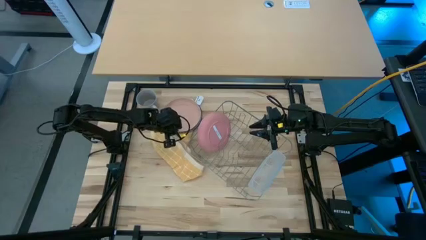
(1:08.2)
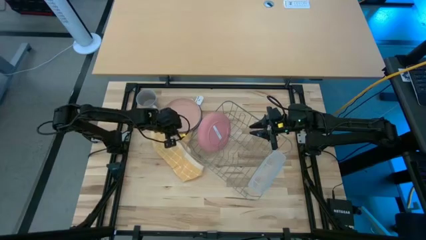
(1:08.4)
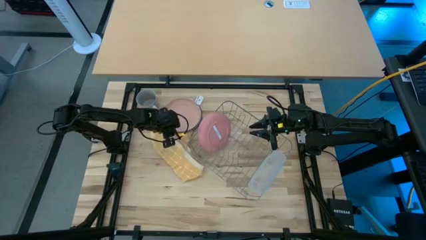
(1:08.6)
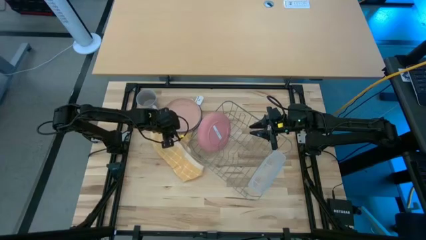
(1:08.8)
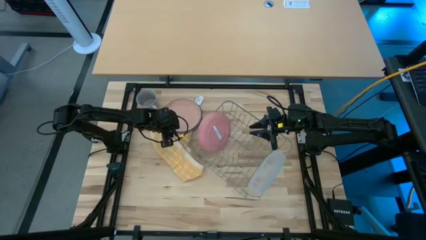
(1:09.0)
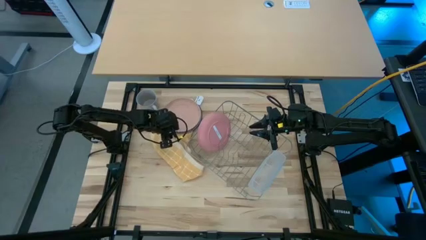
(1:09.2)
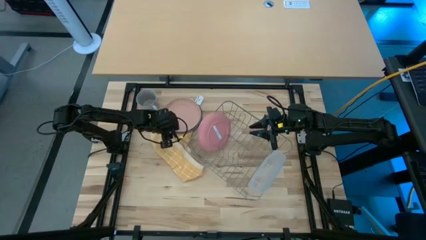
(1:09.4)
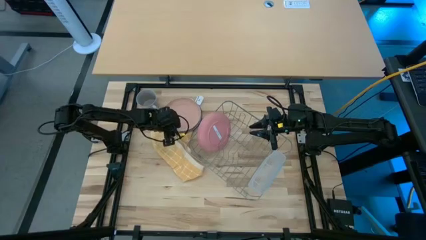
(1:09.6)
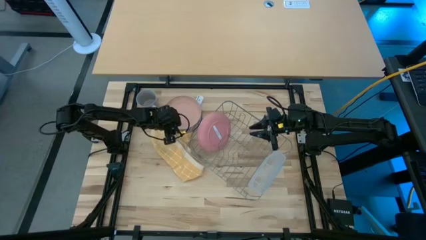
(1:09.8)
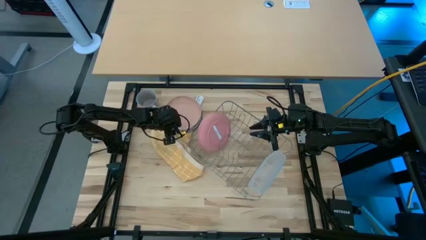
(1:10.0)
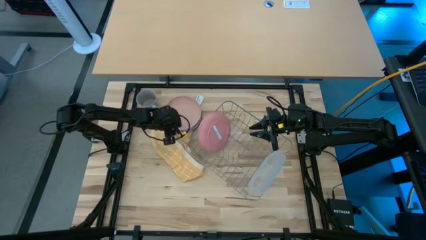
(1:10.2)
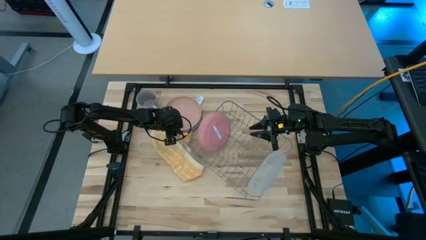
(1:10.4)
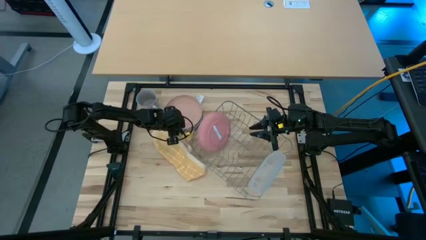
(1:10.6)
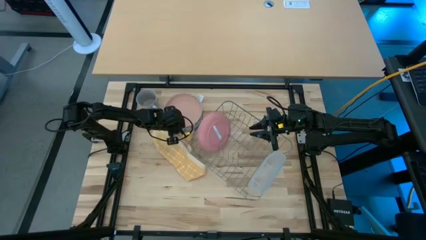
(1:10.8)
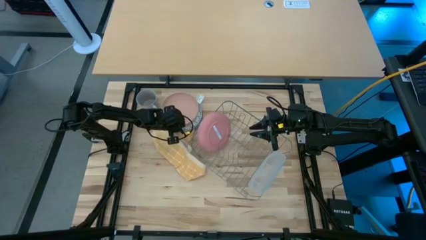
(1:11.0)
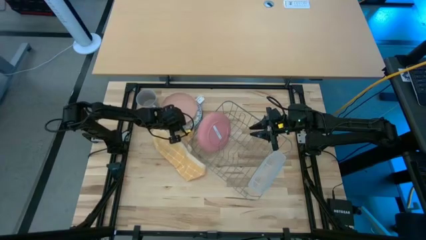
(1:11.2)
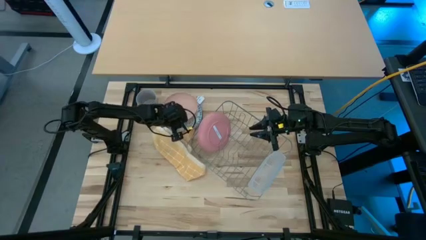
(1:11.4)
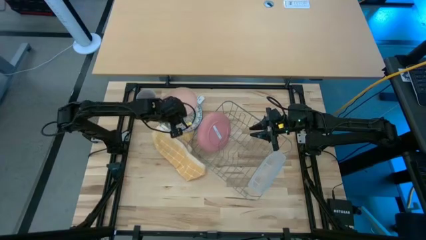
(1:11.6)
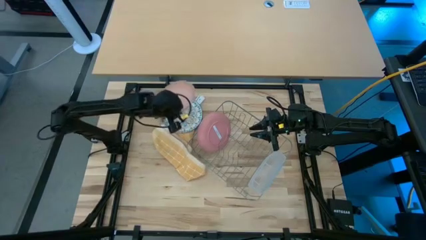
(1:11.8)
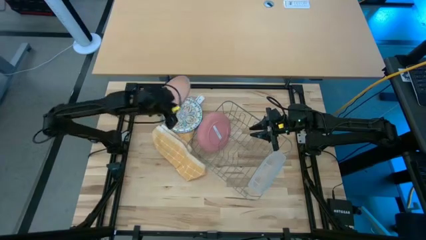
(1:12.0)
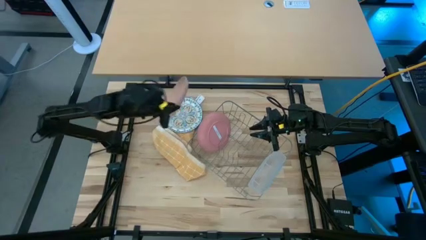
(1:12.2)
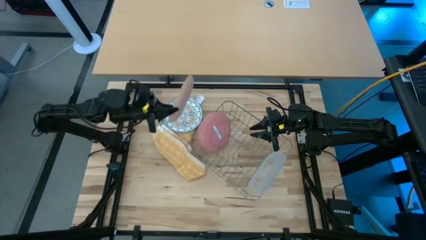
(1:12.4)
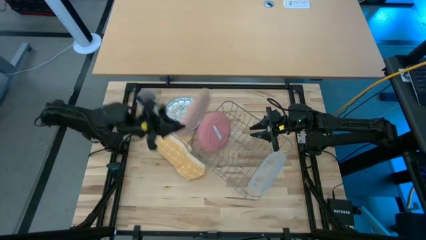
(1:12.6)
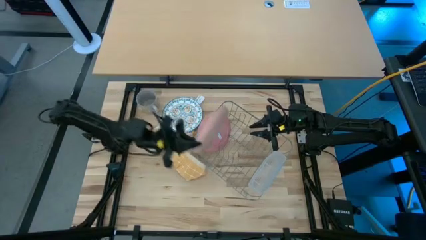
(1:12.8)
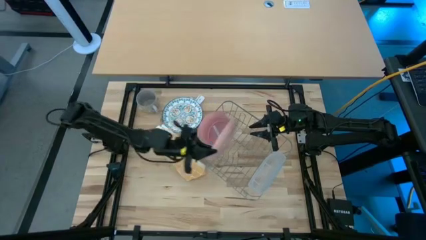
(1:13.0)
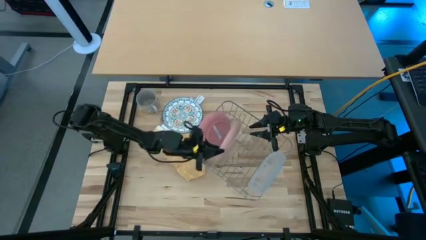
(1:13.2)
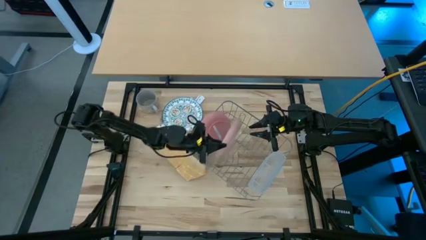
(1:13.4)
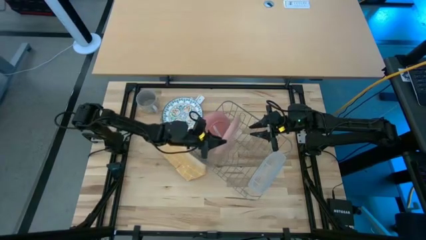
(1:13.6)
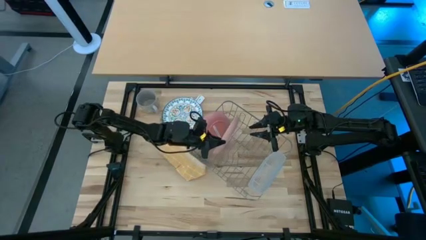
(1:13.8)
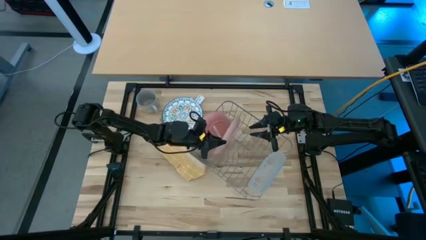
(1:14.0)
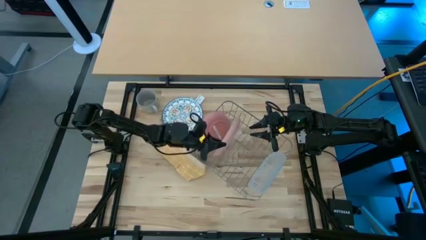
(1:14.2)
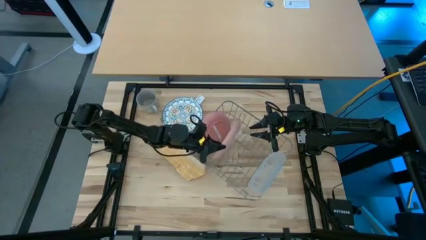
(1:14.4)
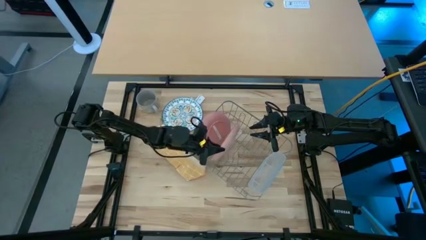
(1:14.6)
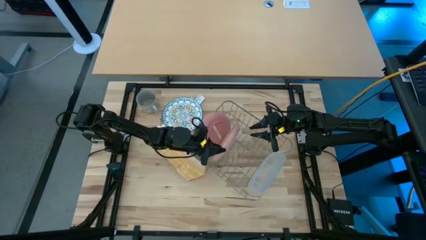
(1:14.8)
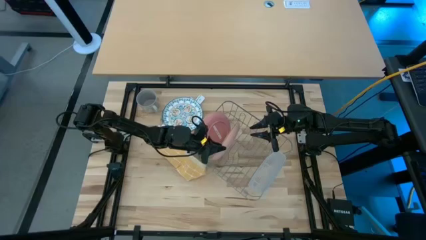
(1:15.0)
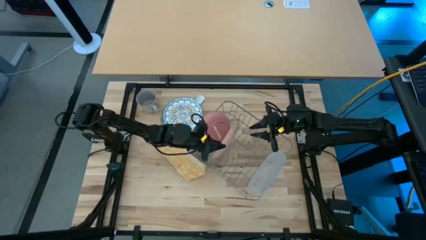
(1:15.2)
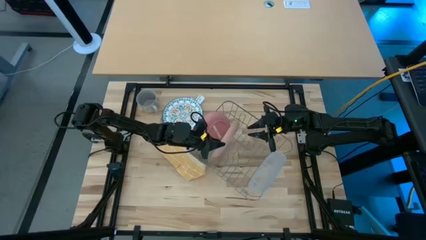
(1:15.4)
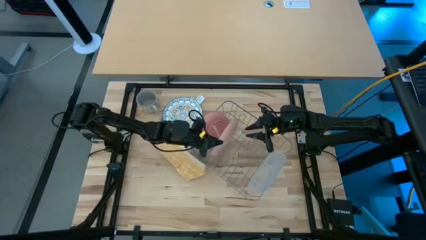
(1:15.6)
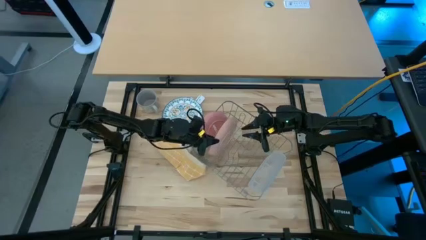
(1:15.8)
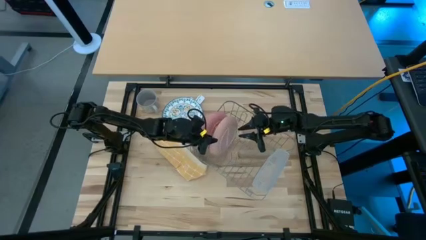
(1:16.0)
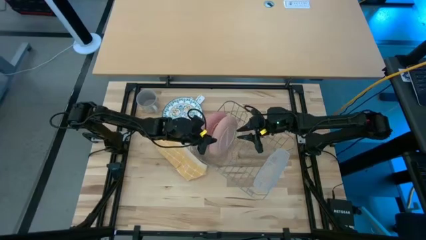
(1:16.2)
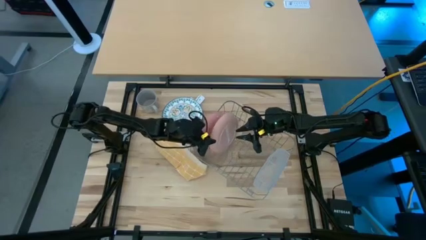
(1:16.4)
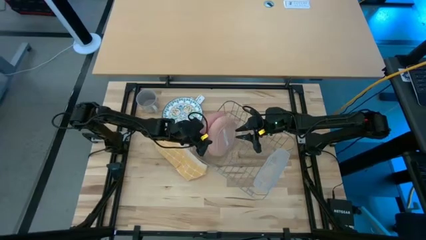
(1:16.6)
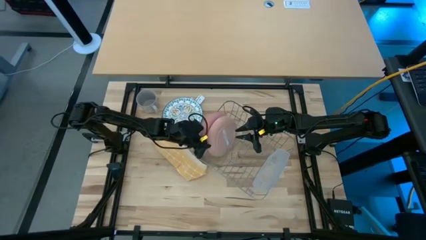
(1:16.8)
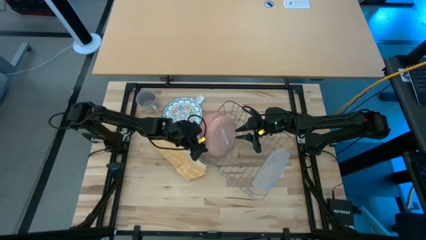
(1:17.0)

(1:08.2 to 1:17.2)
Task: Sort dishes
Put the light orange plate in the dish rack

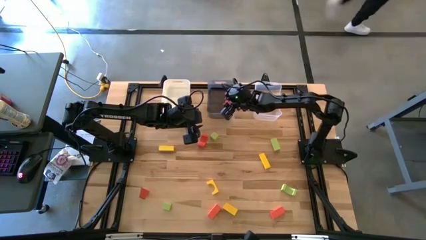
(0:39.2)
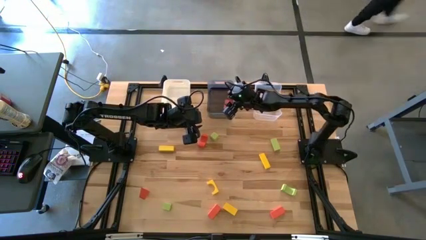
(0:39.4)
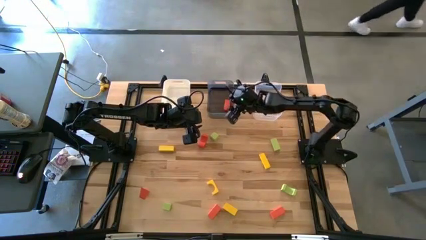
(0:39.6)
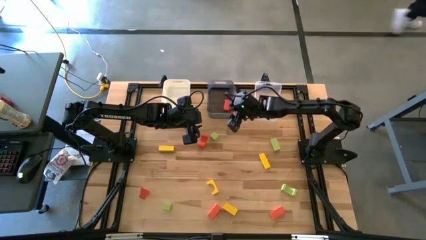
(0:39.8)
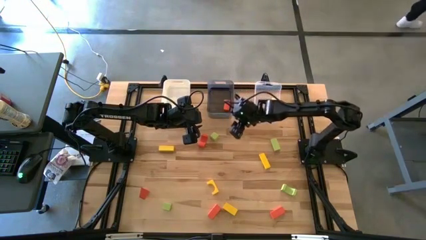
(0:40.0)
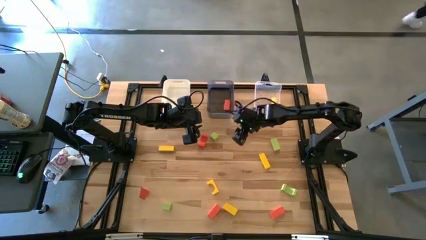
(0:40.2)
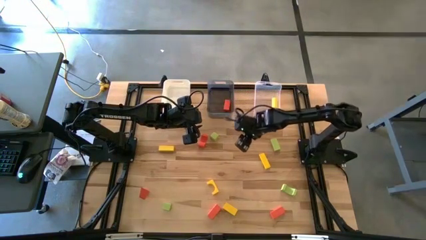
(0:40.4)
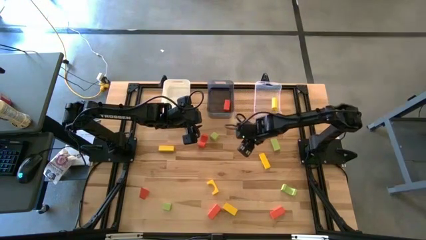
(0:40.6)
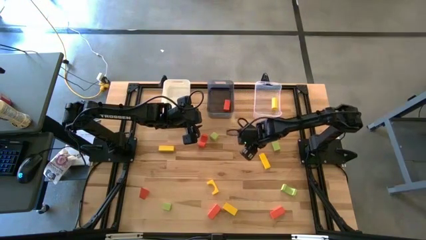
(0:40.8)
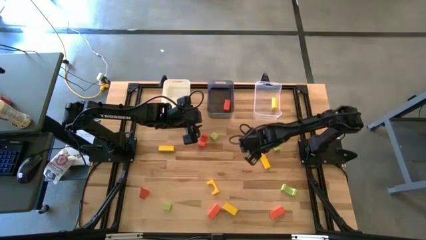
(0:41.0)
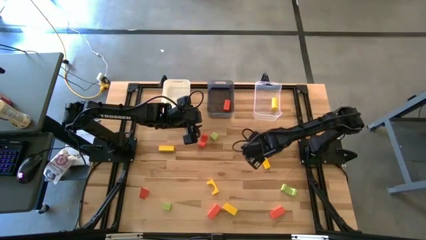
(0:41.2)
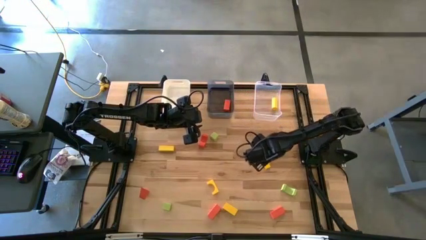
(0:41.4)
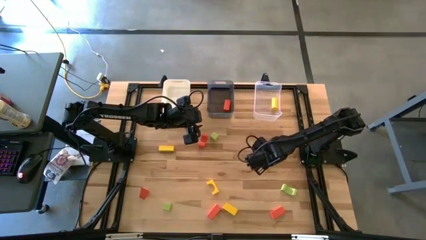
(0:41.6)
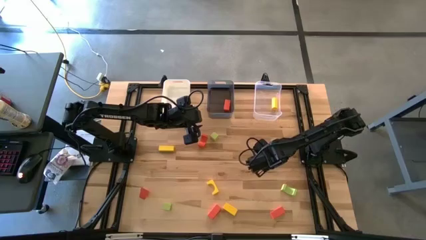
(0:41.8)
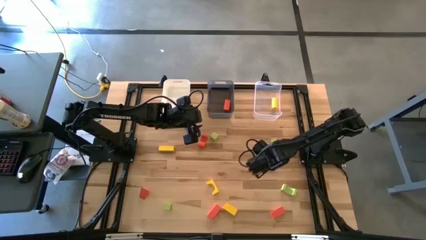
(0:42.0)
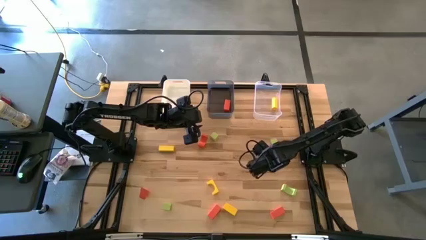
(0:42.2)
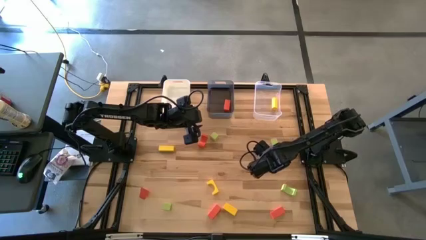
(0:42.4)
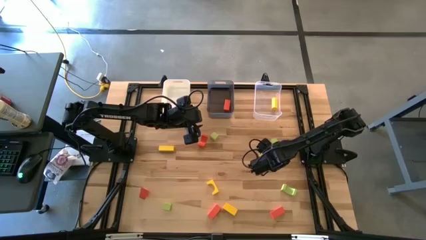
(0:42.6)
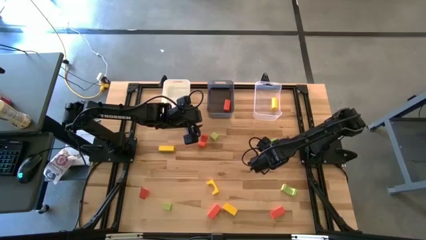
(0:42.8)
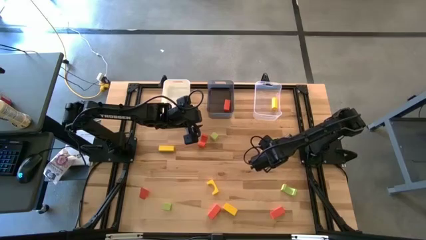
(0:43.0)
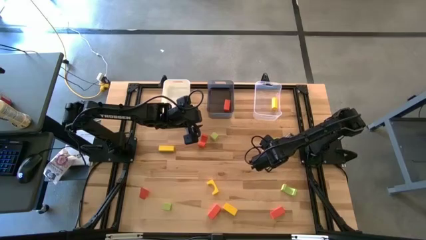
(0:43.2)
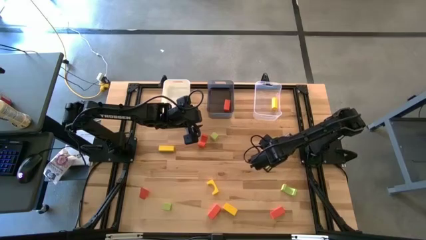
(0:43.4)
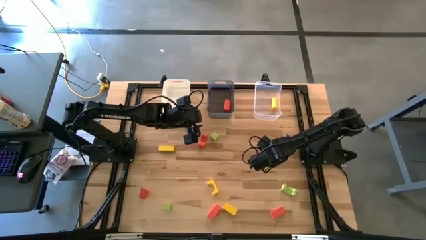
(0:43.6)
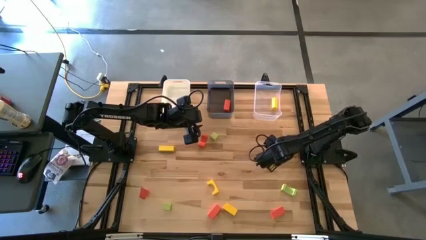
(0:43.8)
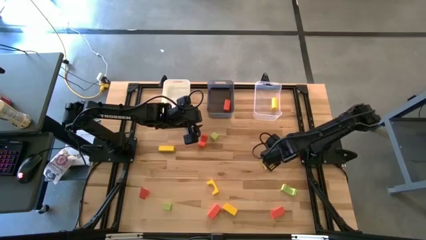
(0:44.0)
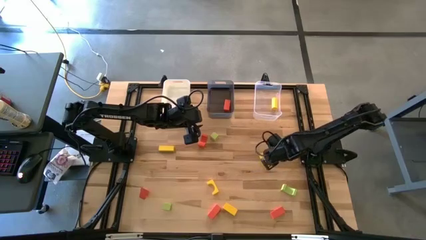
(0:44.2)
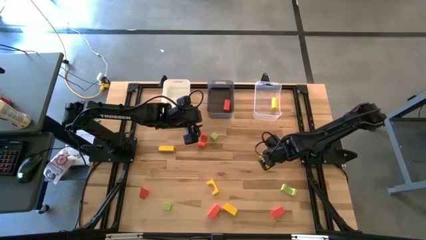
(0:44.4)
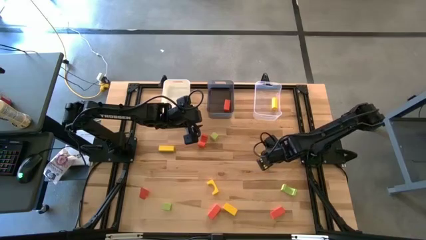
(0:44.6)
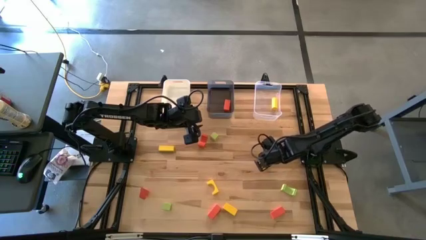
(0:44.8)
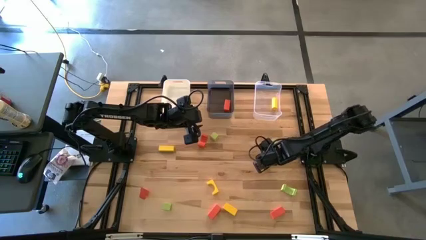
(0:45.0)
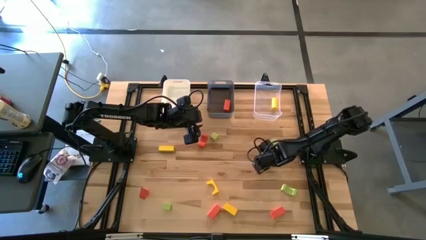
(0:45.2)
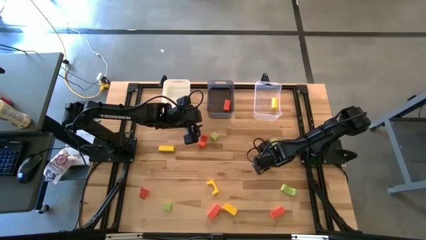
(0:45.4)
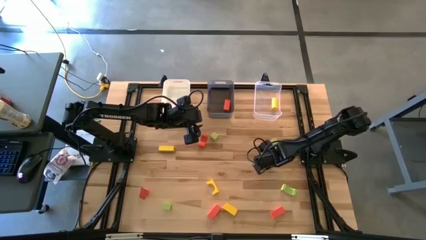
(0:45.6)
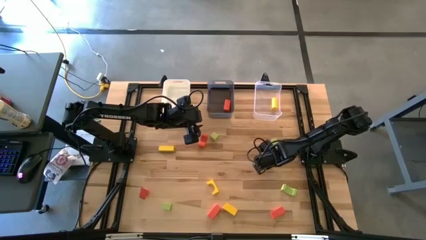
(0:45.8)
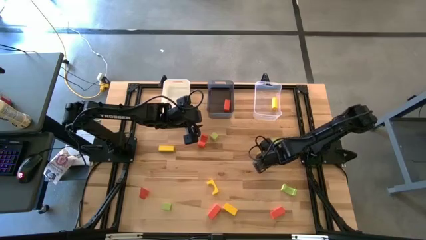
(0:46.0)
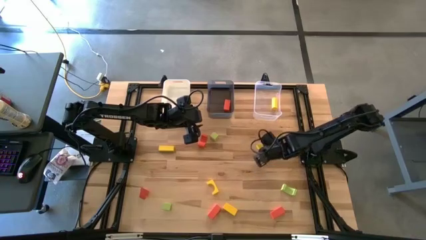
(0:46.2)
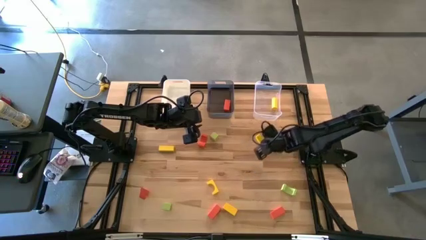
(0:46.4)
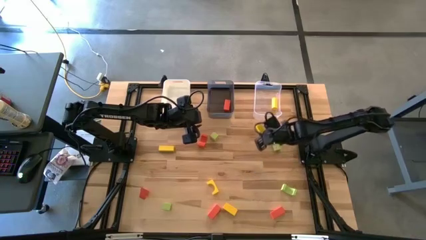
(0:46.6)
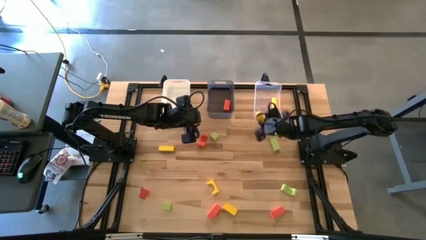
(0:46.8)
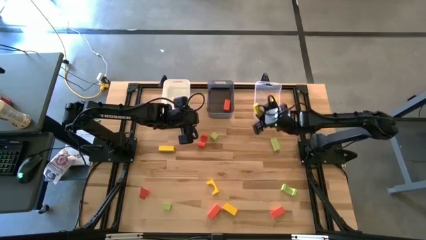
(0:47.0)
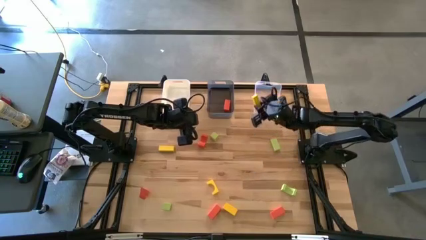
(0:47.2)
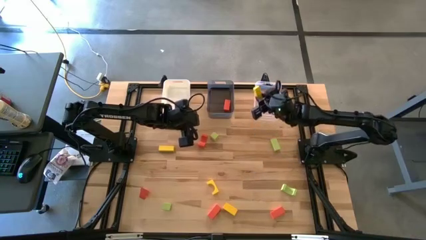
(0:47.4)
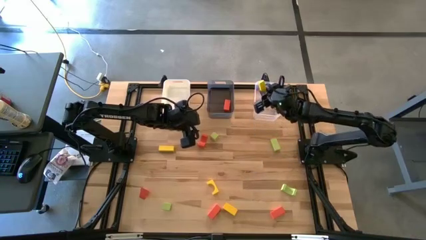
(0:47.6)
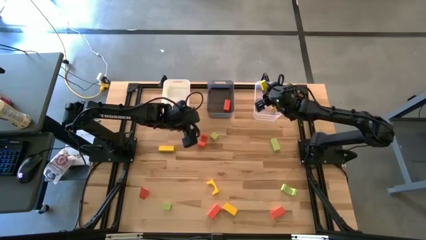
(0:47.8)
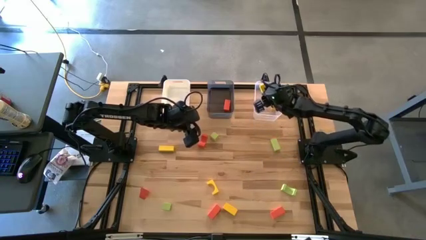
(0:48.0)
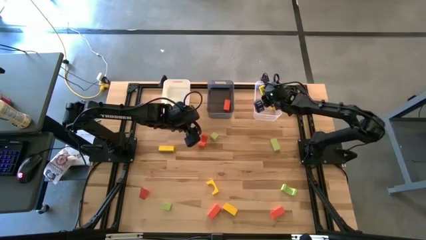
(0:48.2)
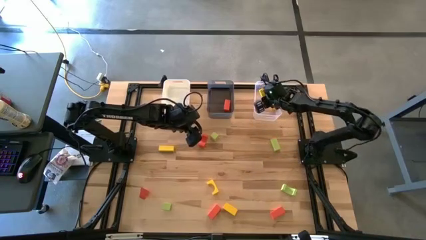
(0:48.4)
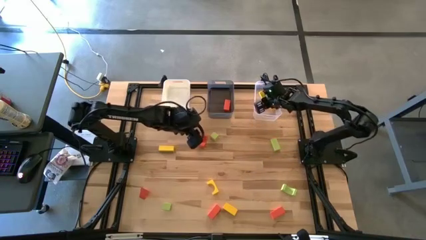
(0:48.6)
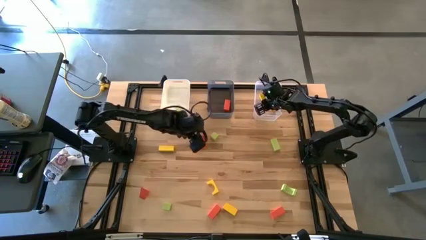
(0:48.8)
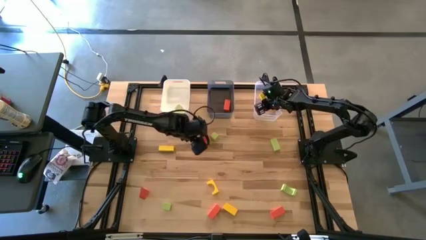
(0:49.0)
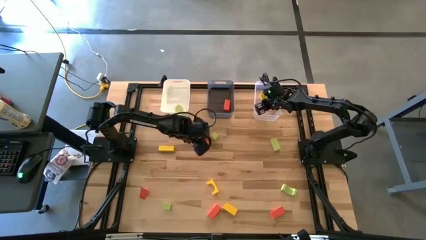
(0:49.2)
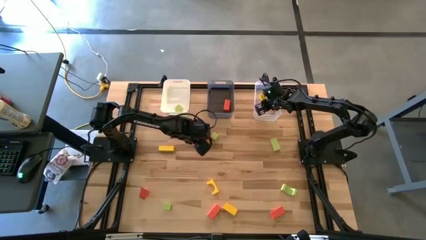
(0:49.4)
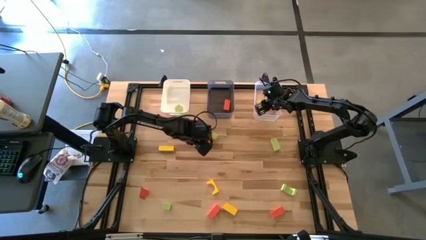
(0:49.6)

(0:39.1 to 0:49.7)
Task: Sort & place blocks by color
Put the yellow block into the transparent bin
